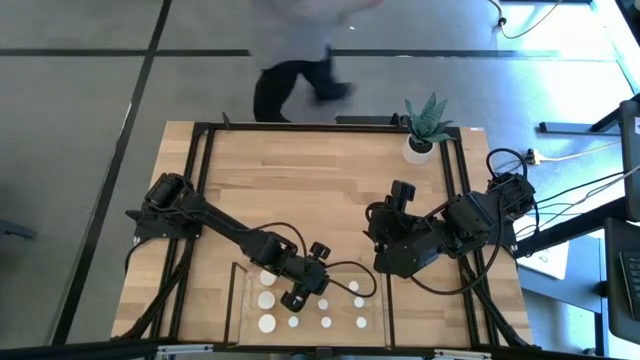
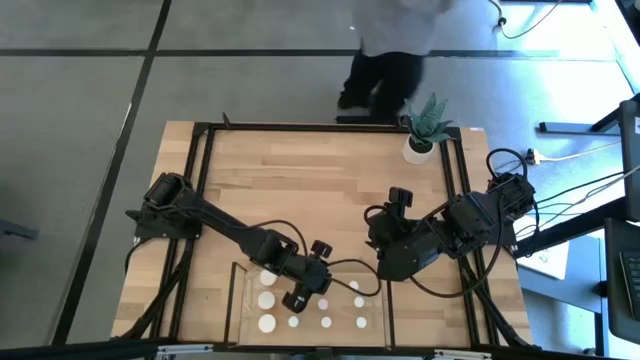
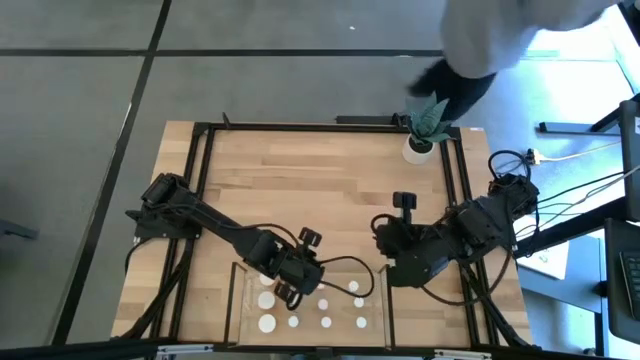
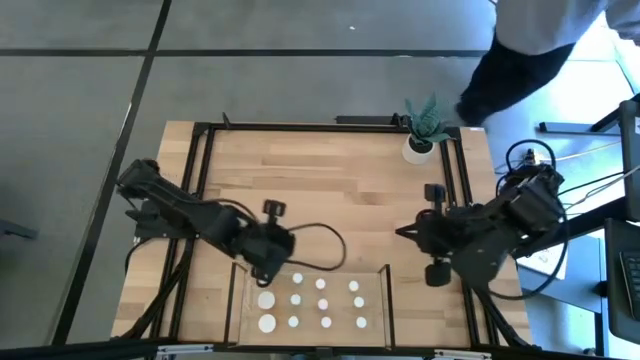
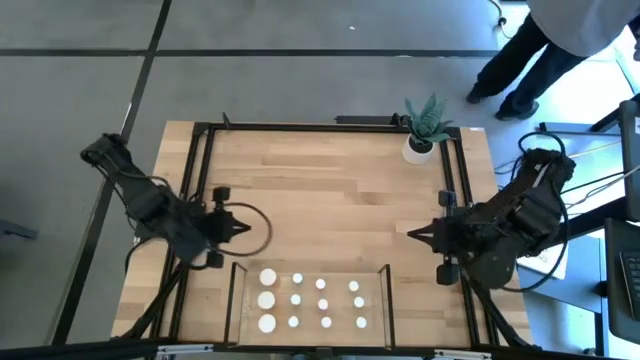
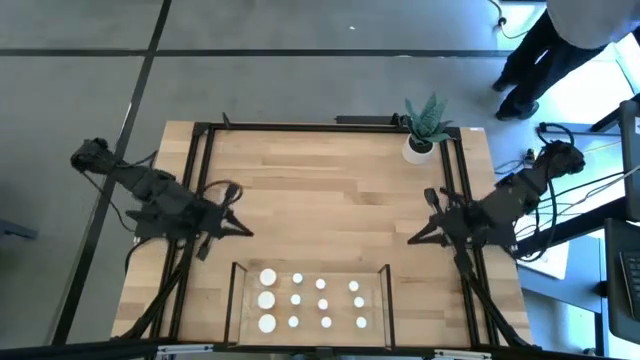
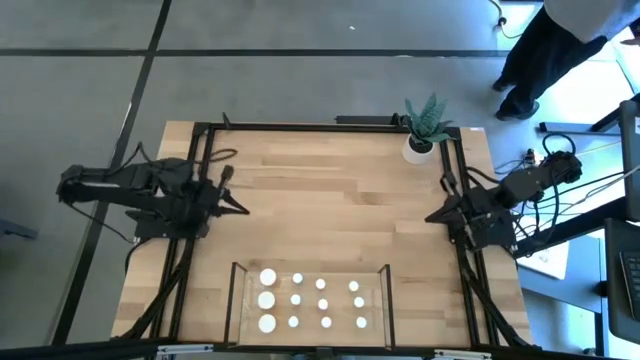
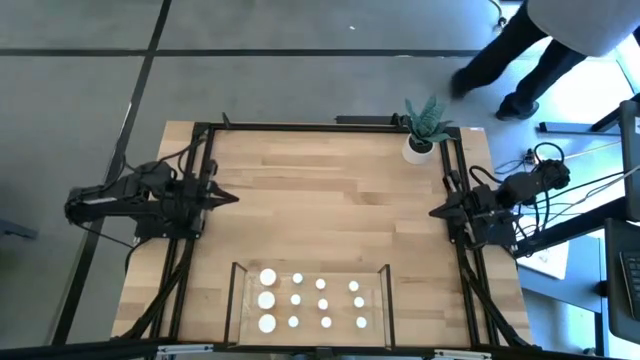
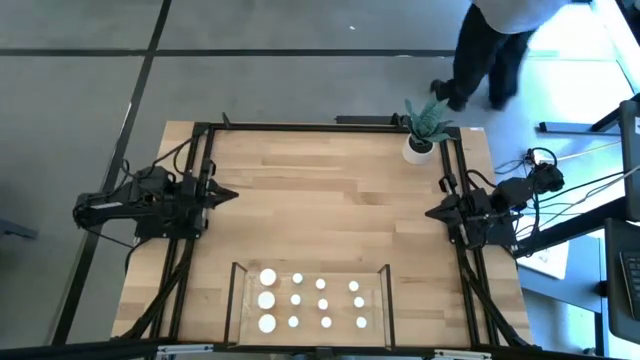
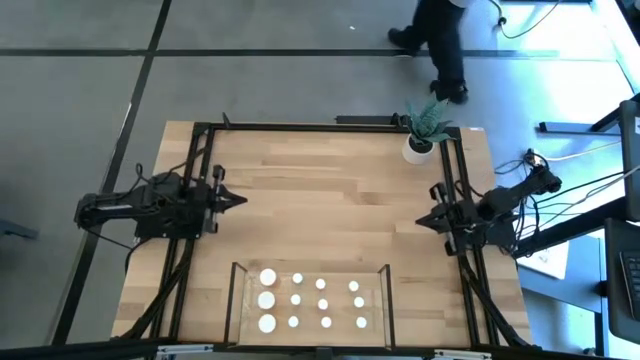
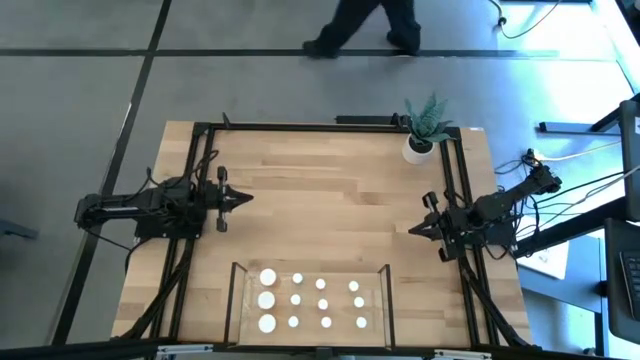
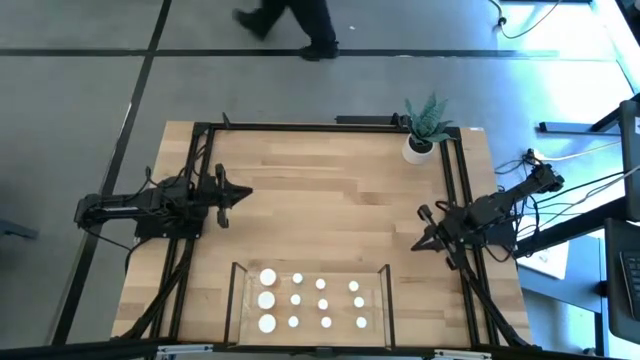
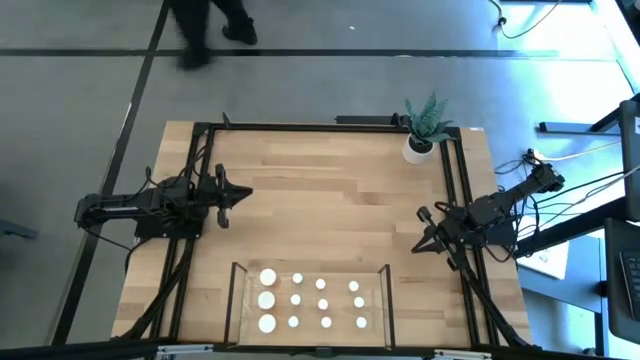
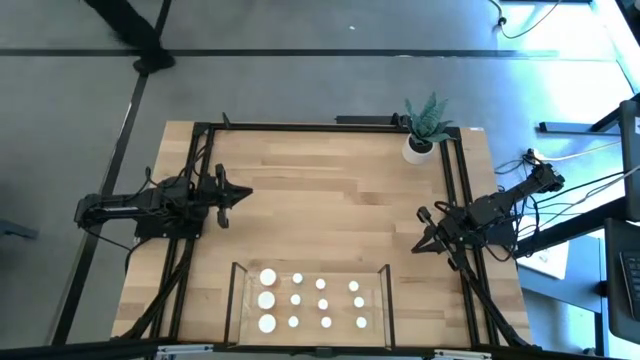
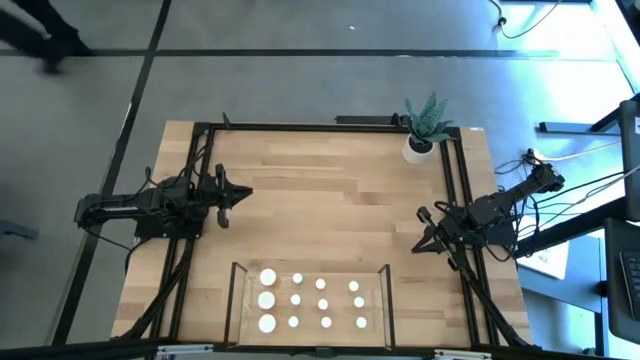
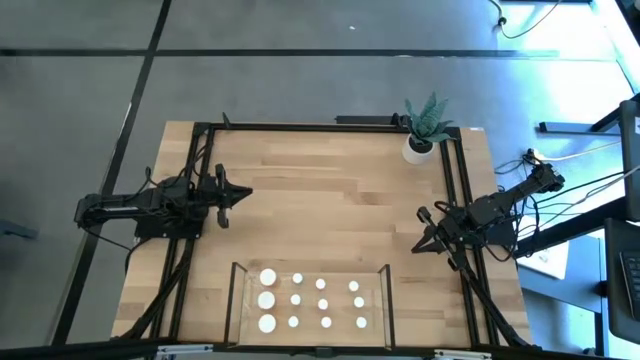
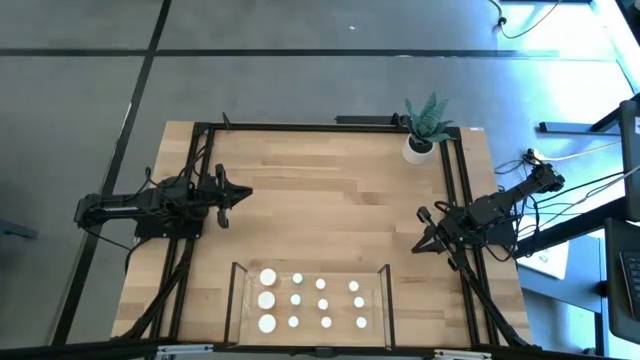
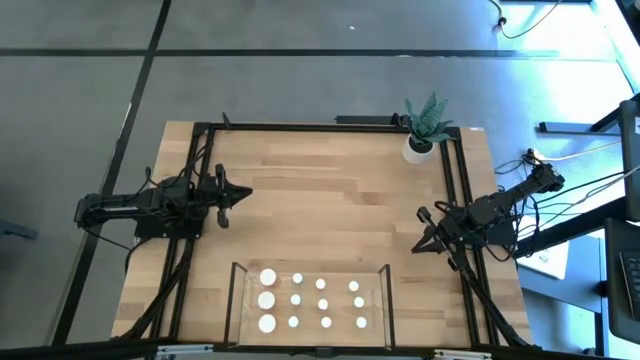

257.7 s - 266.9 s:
Task: Pick and place medicine bottles onto shelf by color
Return to Home Position

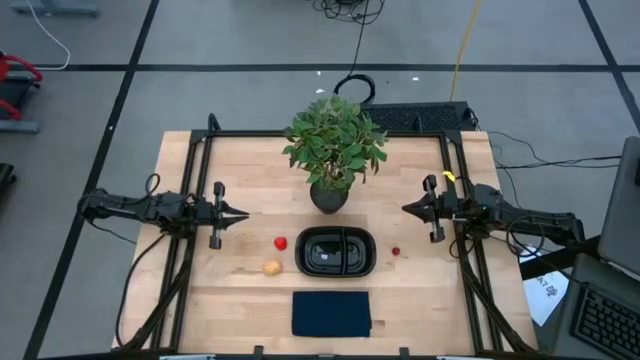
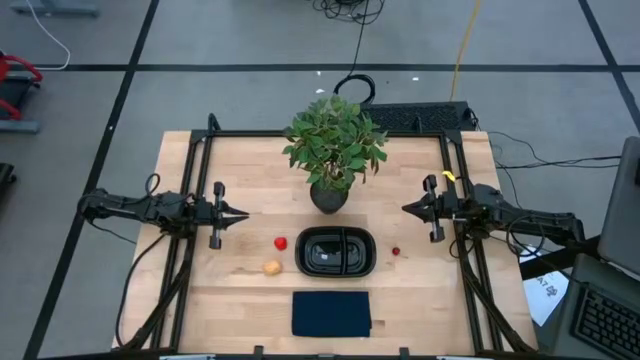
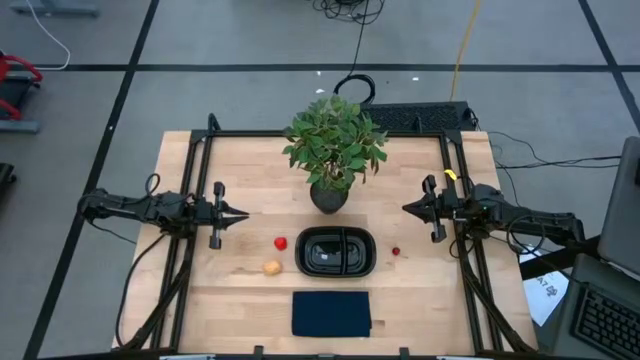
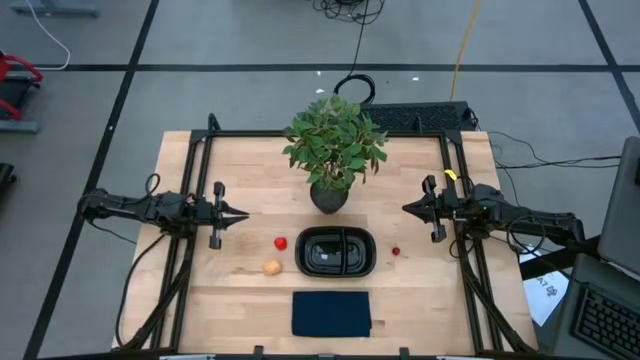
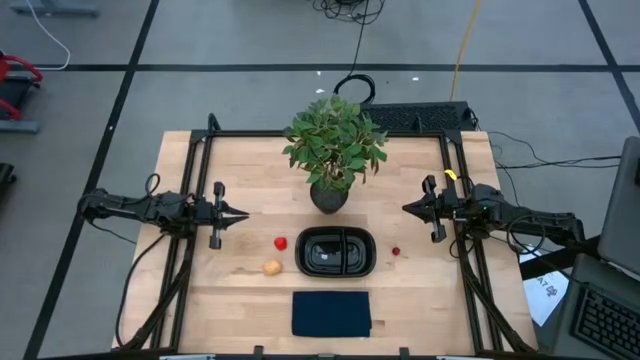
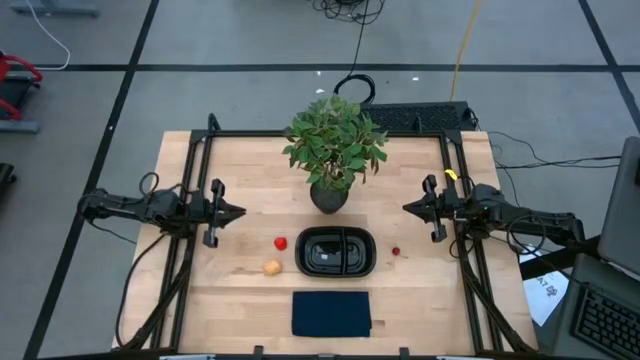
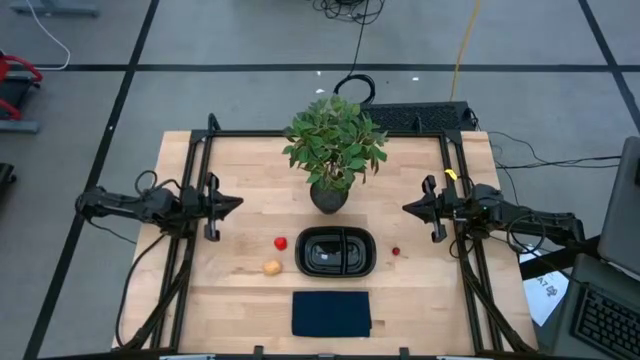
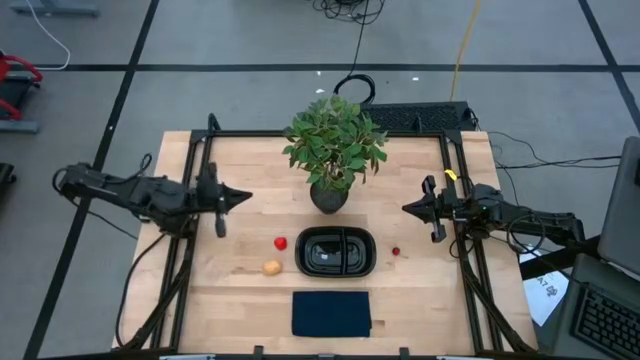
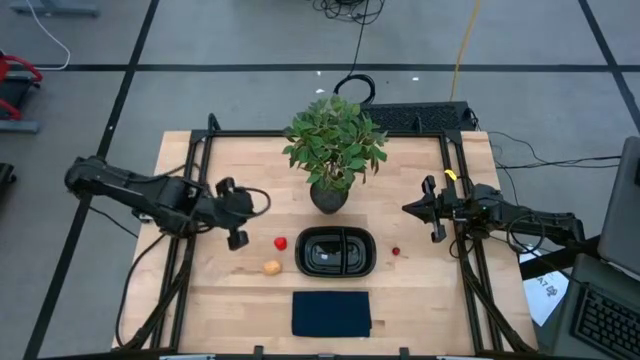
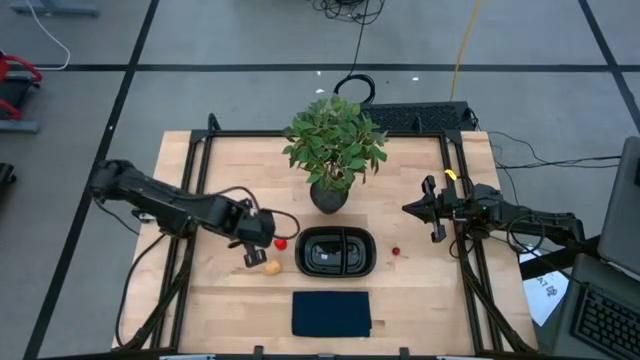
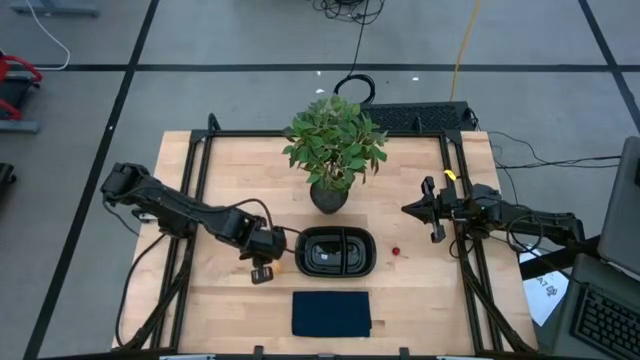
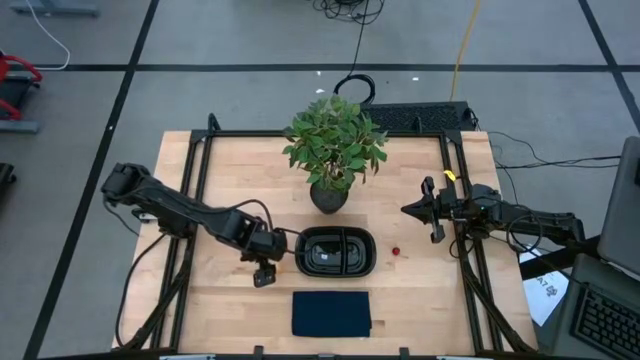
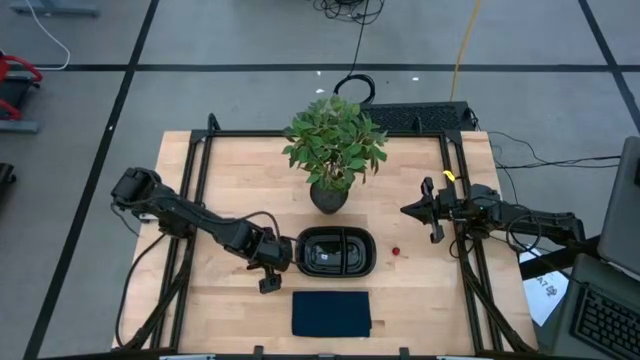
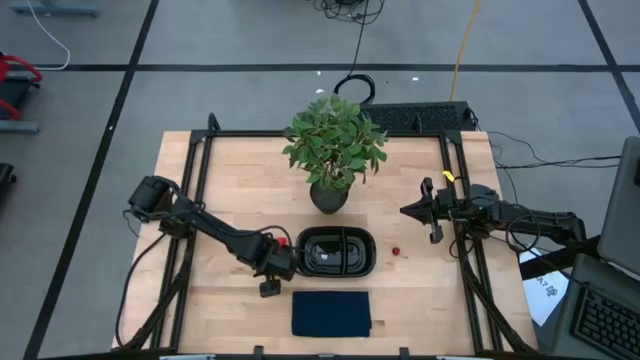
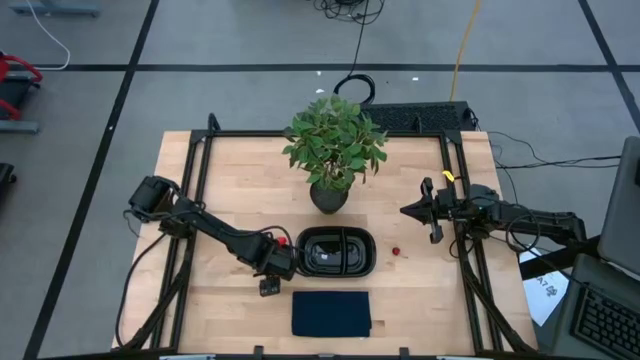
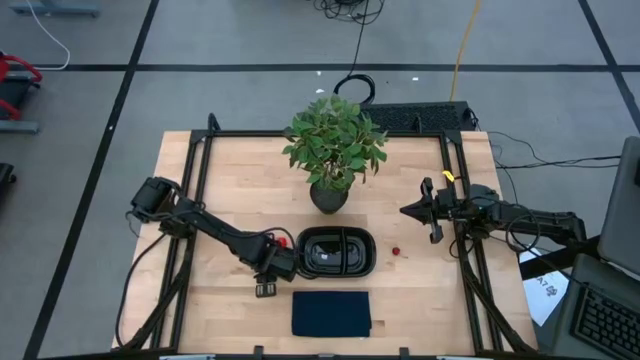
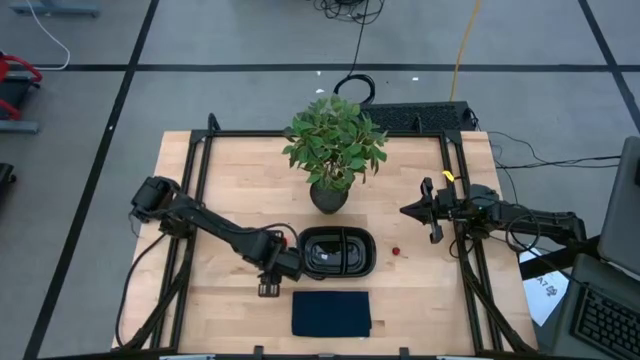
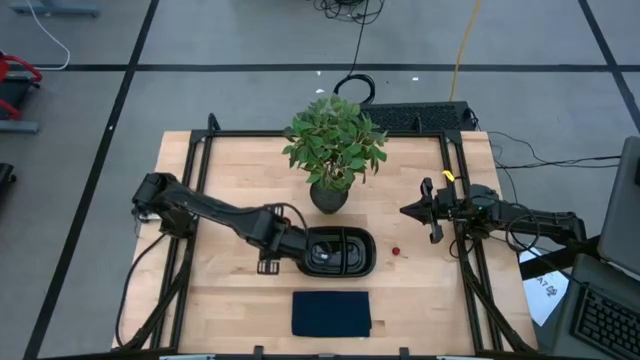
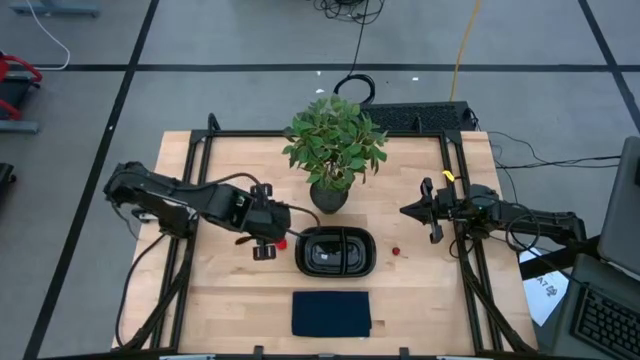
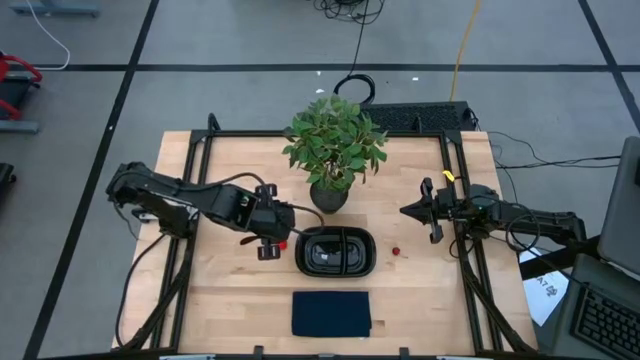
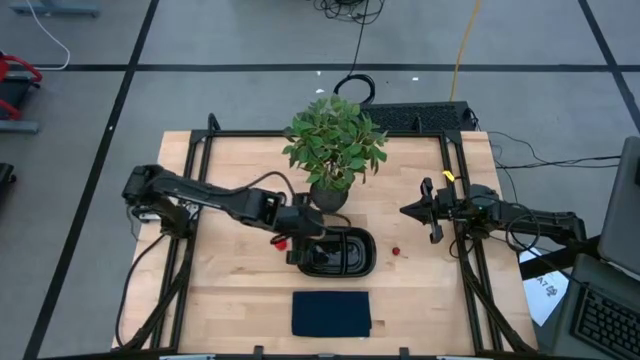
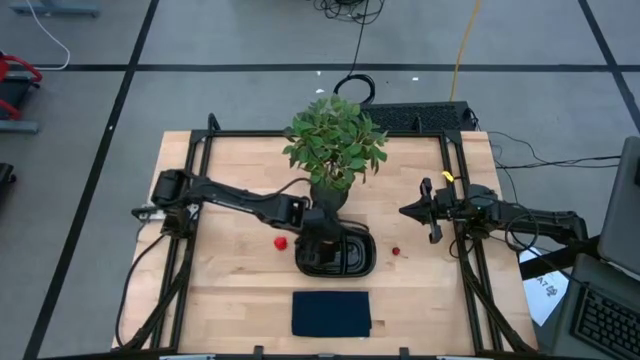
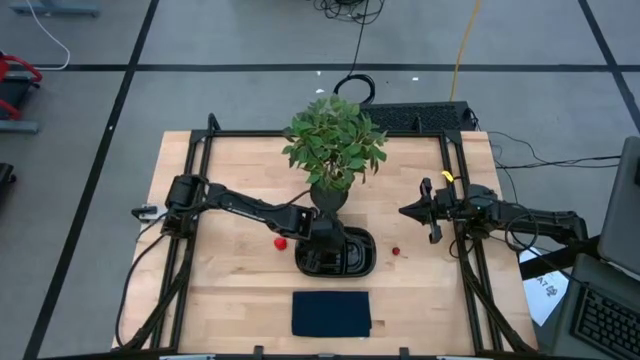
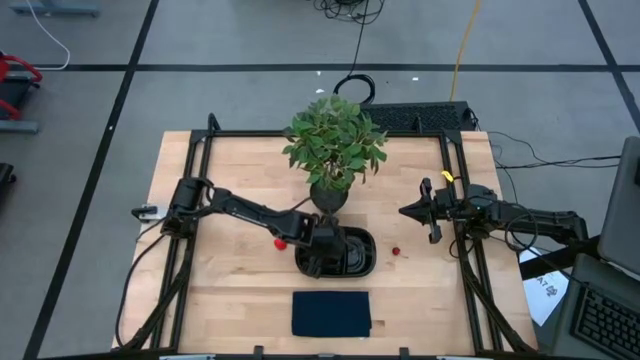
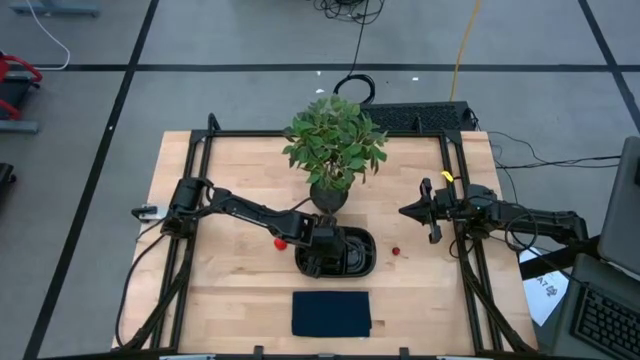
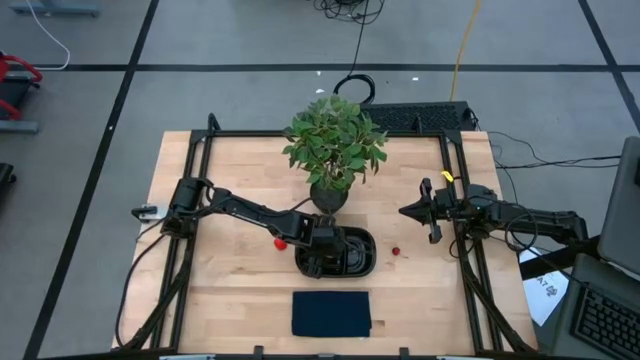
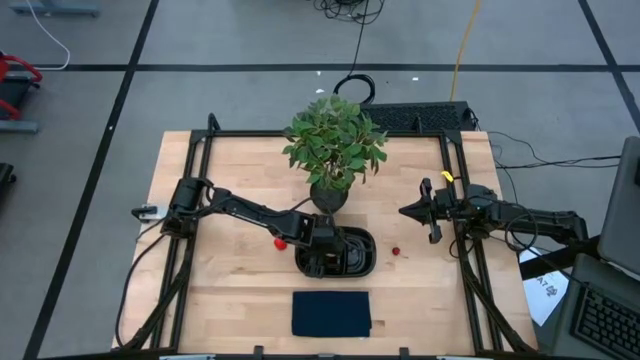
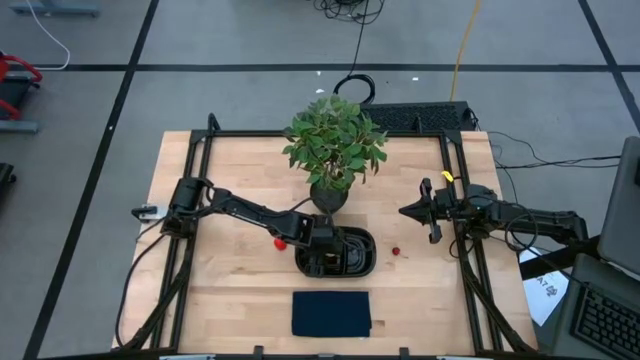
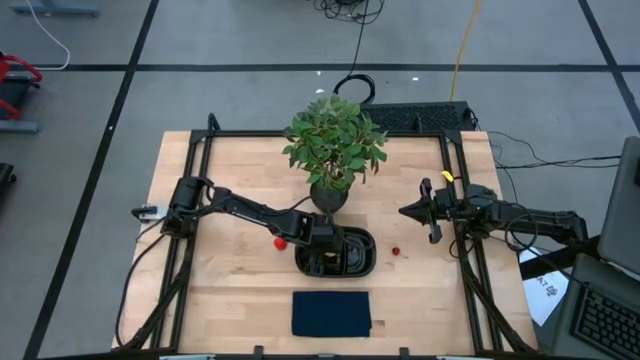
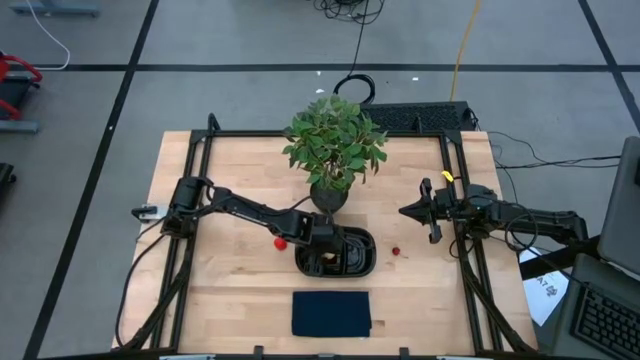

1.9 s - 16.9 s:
Task: Pick and placing Produce into tupperware
Put the brown potato into the black container
